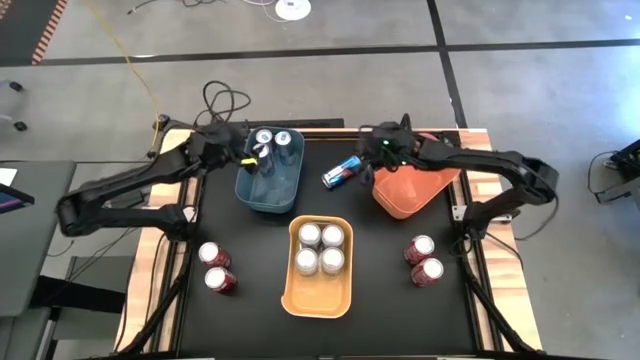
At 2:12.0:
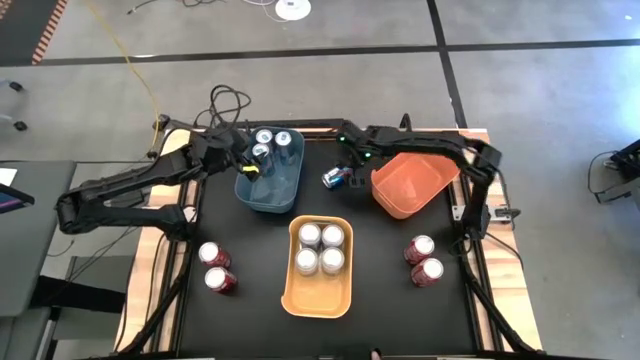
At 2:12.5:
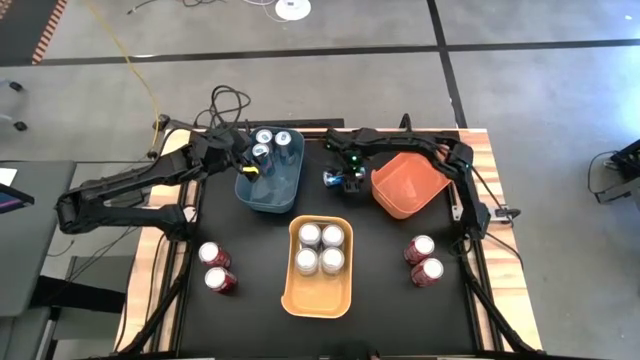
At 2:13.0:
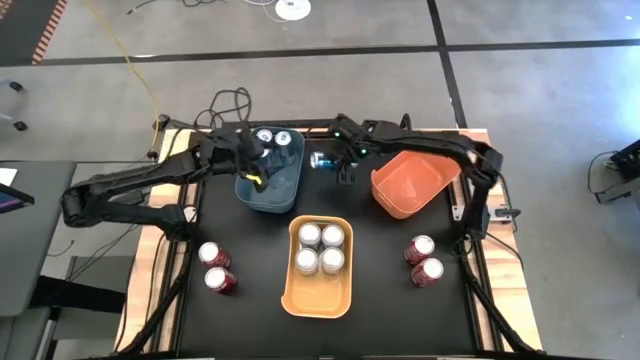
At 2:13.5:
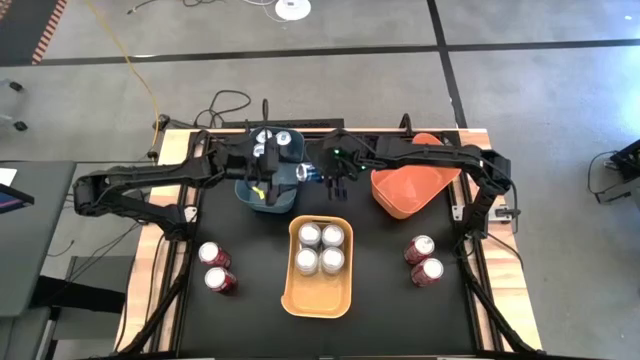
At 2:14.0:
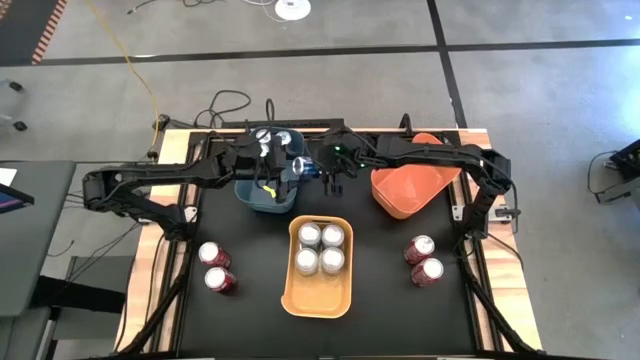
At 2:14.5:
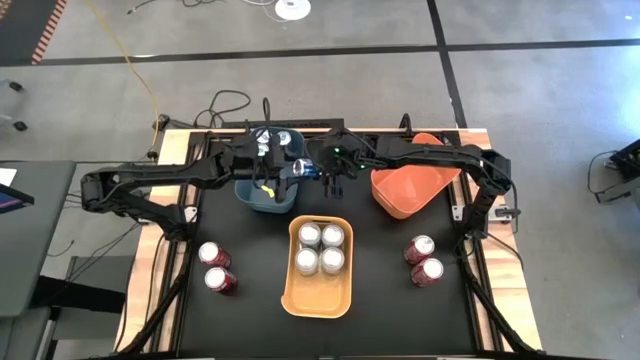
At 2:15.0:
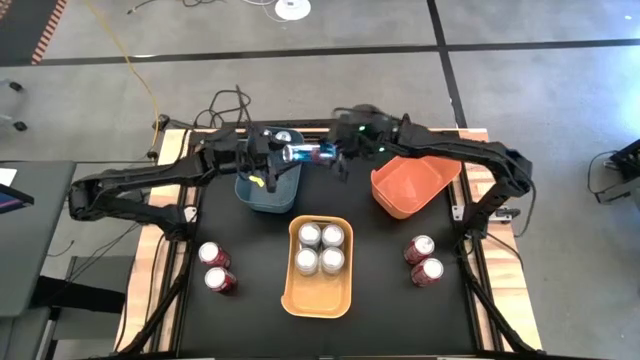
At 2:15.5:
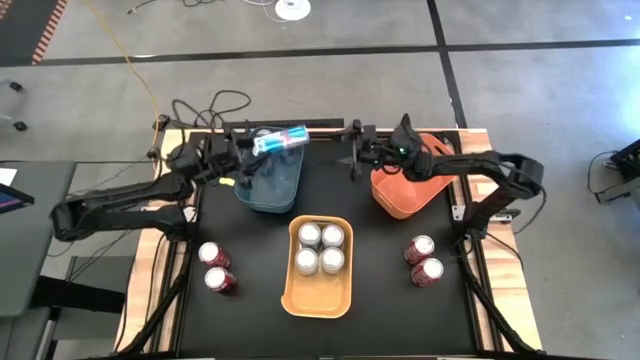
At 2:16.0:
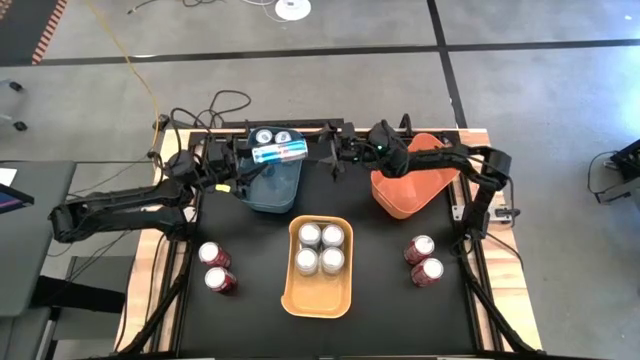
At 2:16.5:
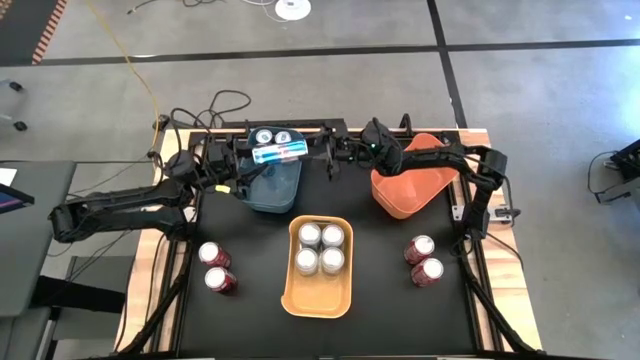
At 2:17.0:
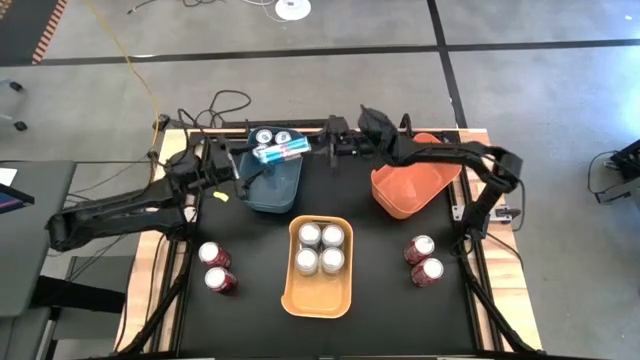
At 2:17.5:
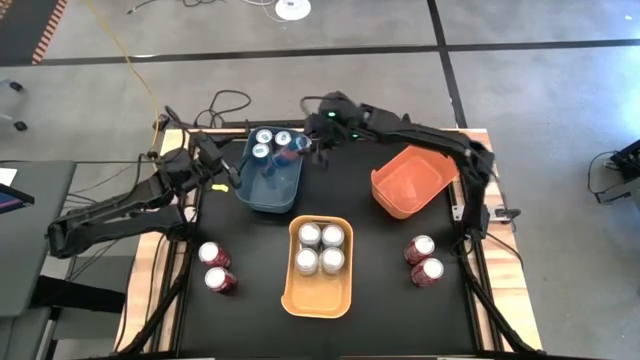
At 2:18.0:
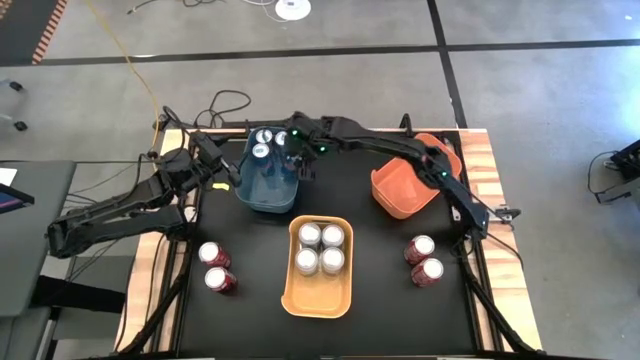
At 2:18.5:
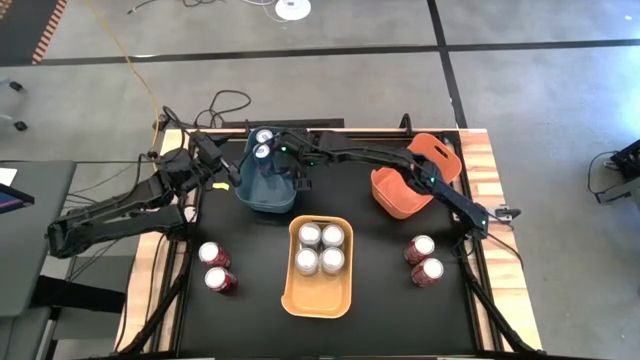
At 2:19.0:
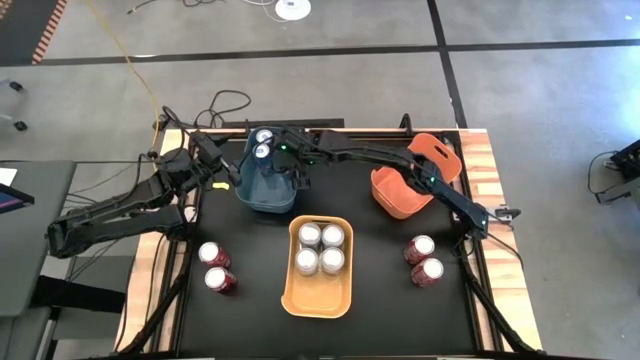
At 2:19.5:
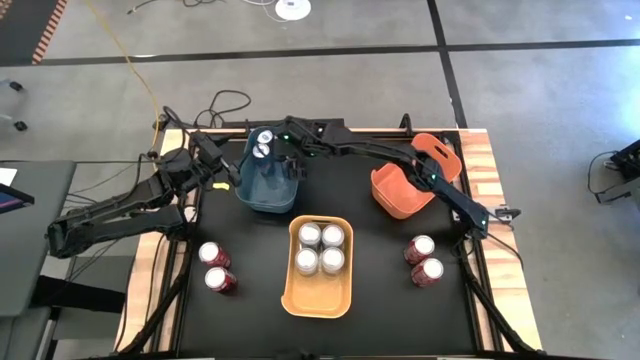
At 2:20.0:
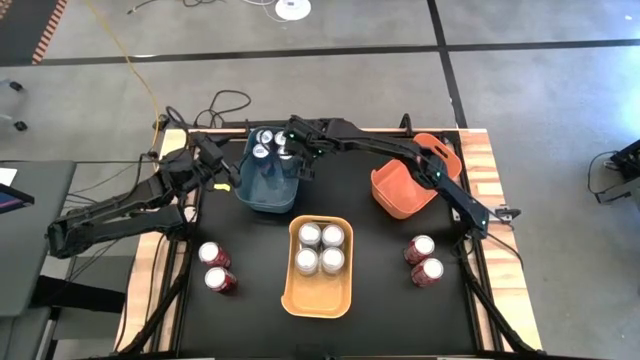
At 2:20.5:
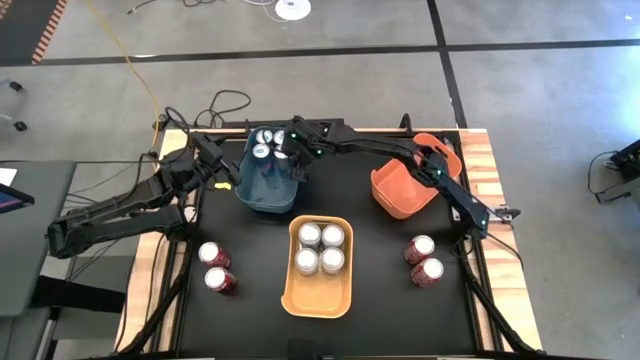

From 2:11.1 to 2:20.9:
Task: Sort soda cans
Put the blue soda can into the blue bin

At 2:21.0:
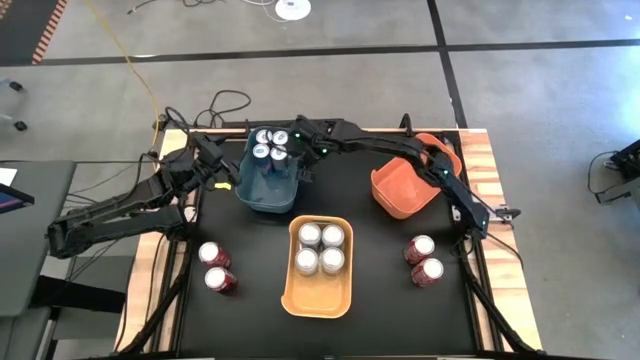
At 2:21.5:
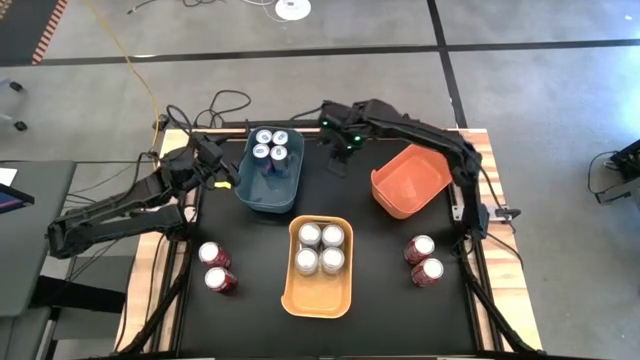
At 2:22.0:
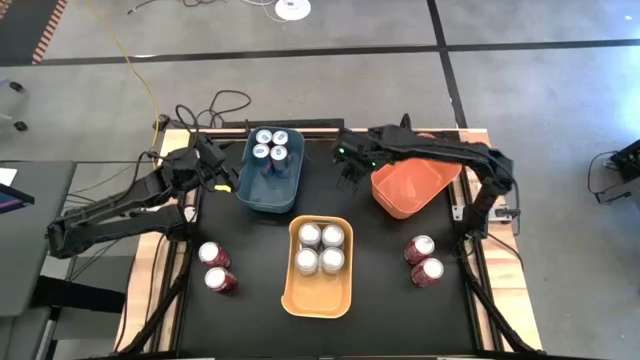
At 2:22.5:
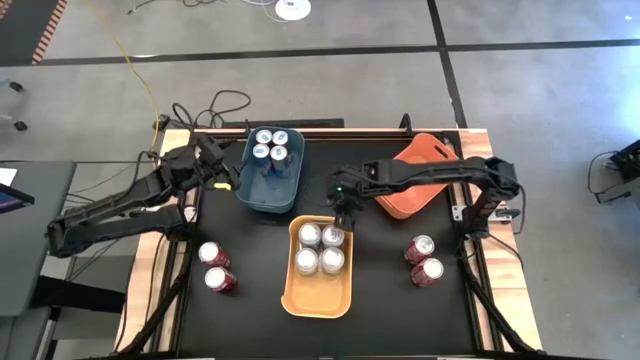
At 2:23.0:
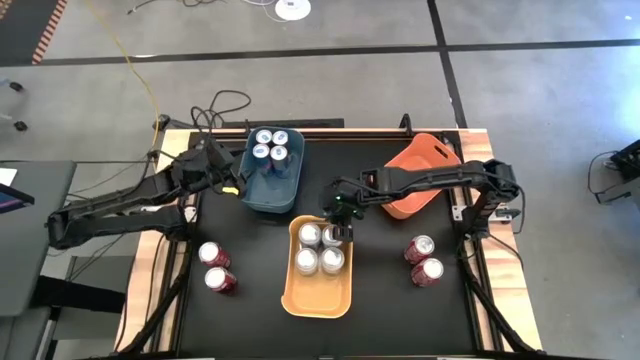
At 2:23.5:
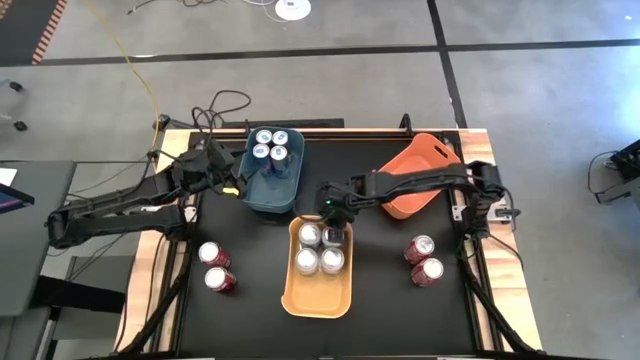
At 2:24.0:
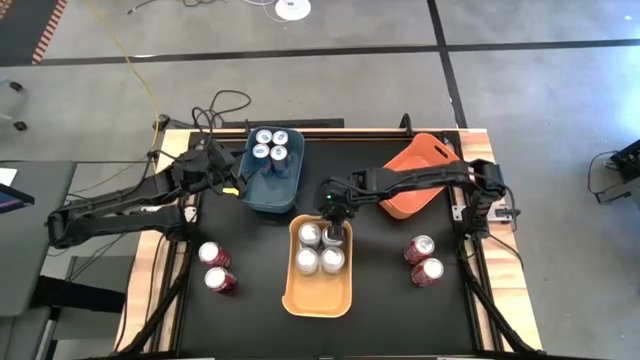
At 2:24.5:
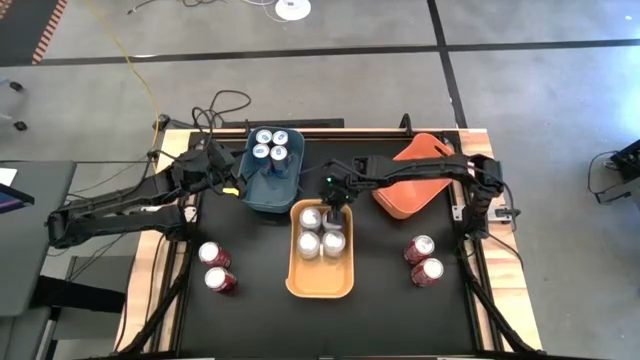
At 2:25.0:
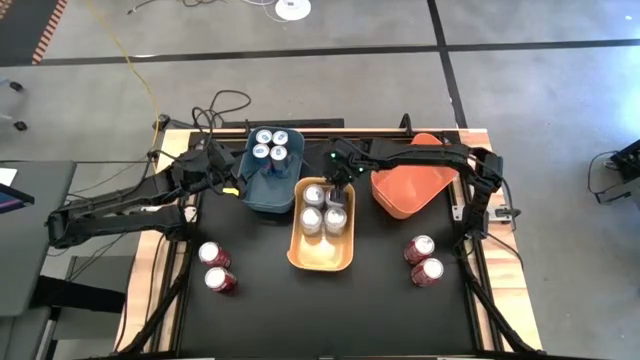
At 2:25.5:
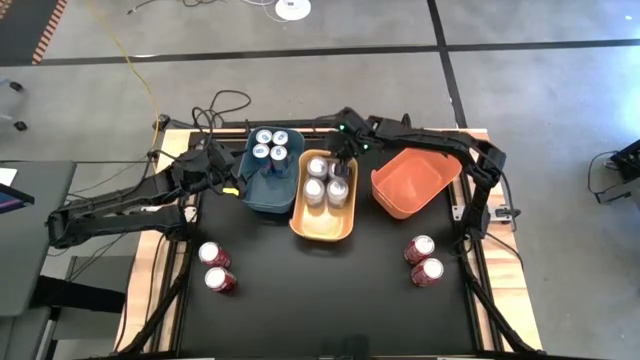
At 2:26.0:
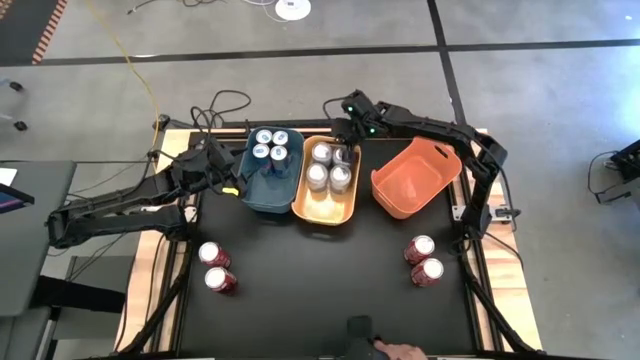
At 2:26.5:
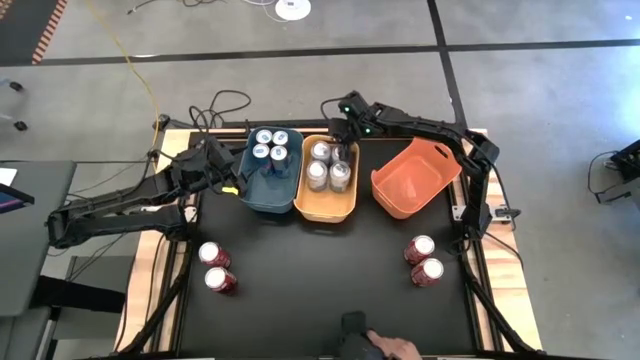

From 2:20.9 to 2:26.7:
Move the yellow bin to right the blue bin

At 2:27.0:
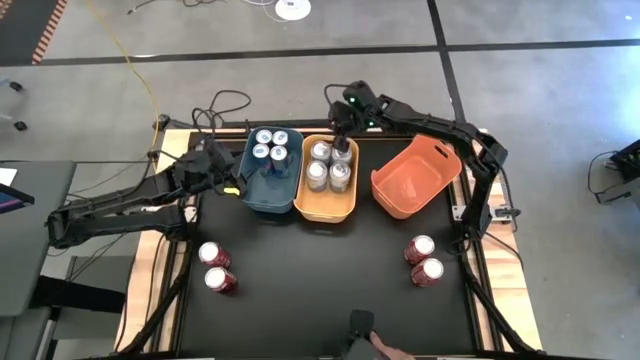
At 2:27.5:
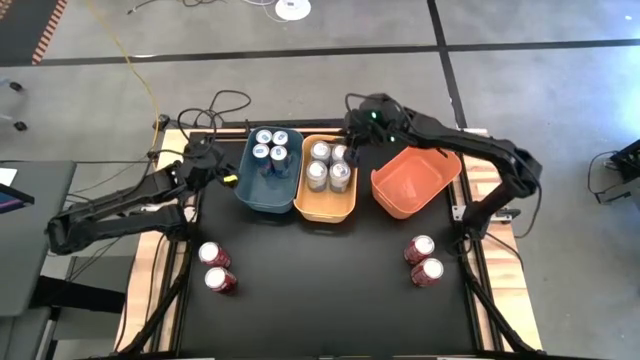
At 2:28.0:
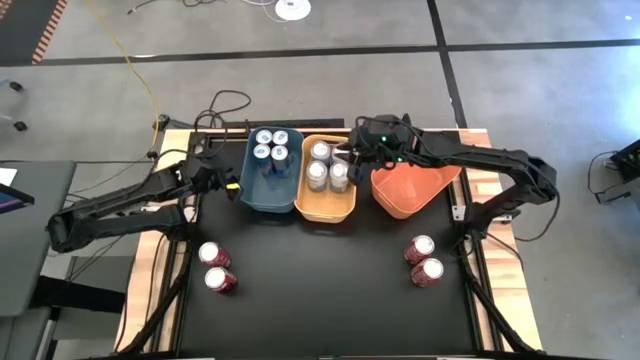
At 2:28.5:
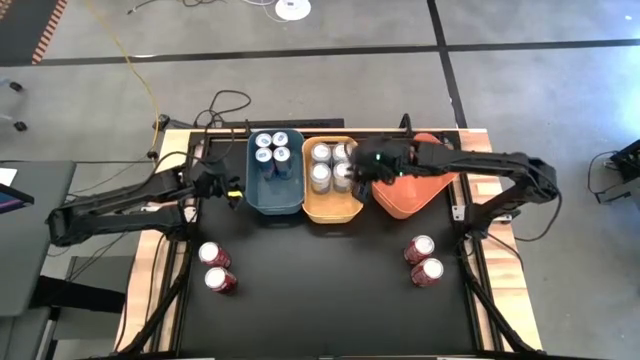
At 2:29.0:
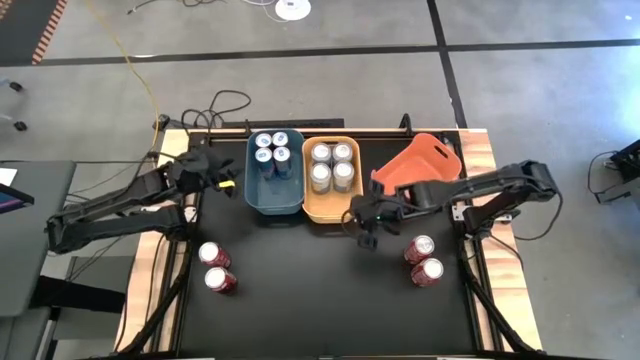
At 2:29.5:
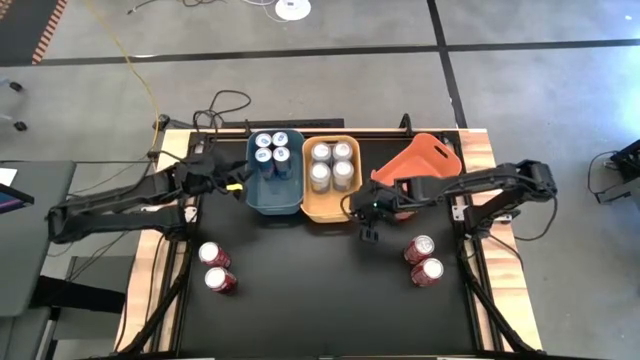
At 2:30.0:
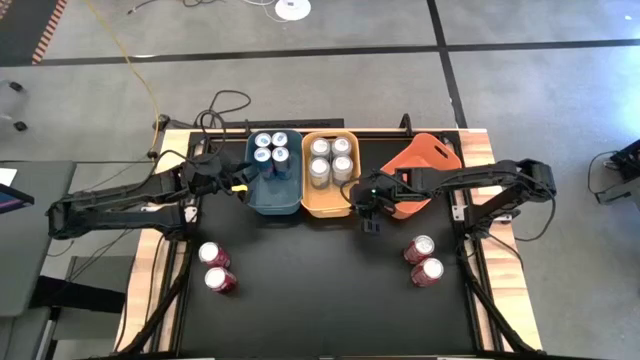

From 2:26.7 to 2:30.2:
Adjust the bins

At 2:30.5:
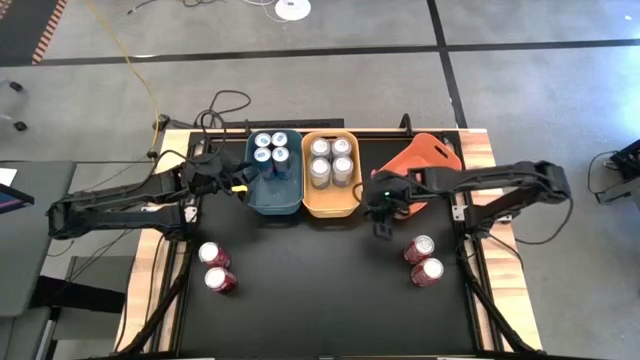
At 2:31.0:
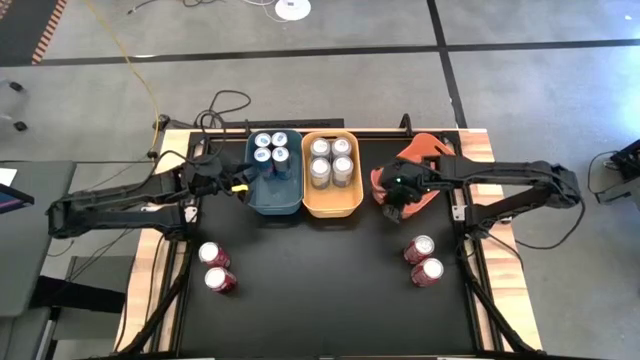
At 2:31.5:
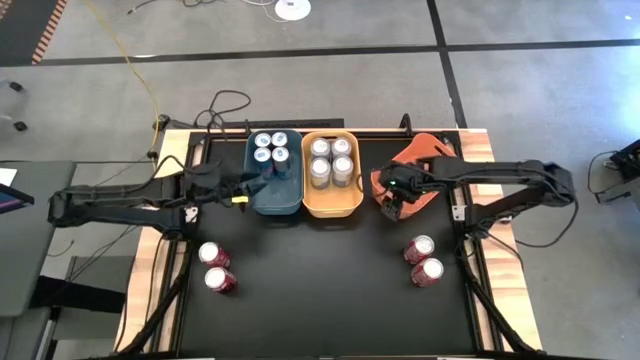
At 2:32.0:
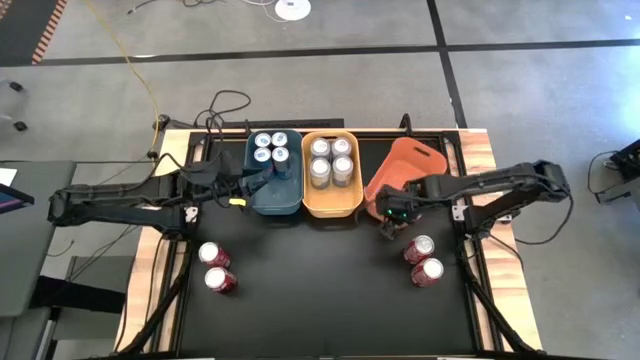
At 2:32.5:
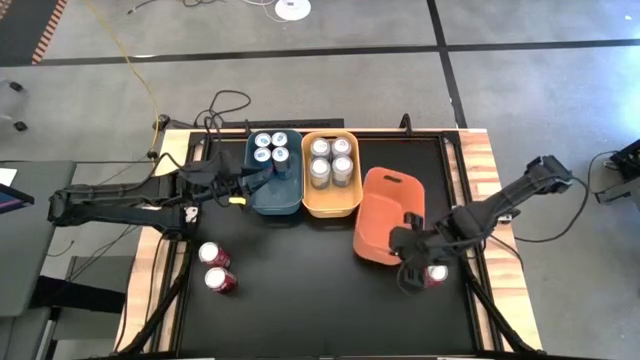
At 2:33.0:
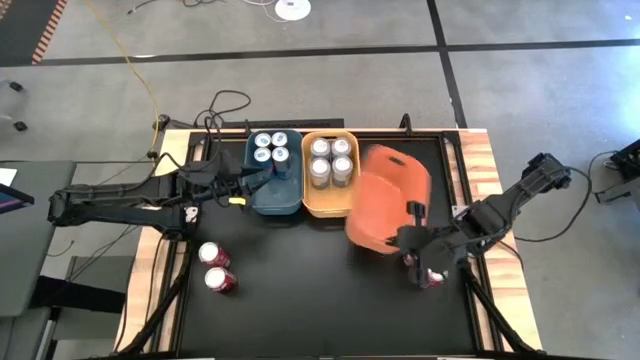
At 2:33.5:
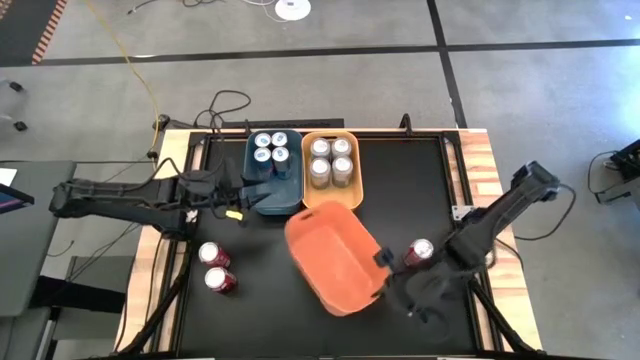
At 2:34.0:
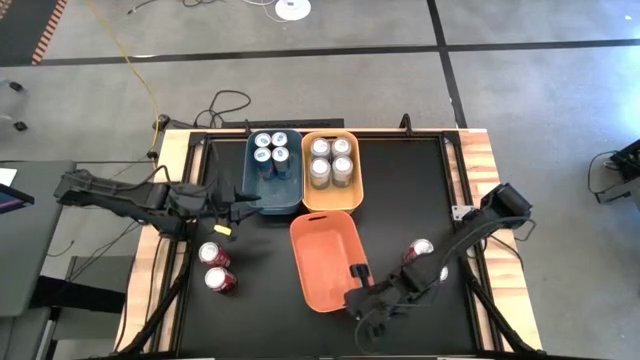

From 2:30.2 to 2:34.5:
Move the orange bin to the center of the table
